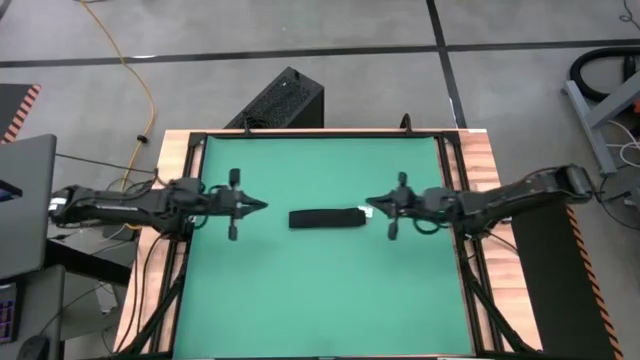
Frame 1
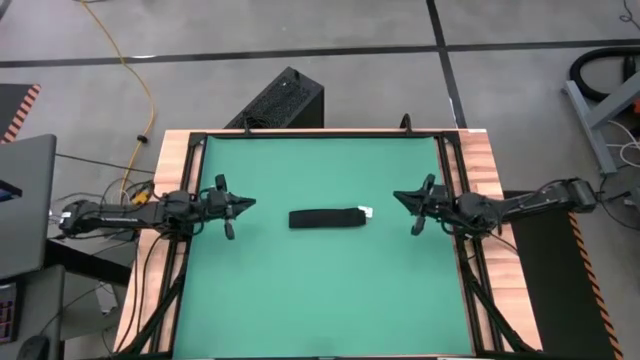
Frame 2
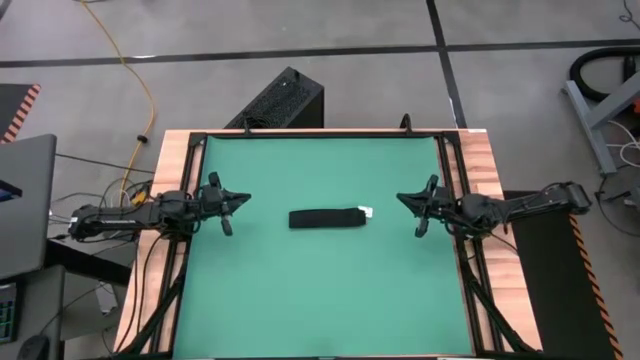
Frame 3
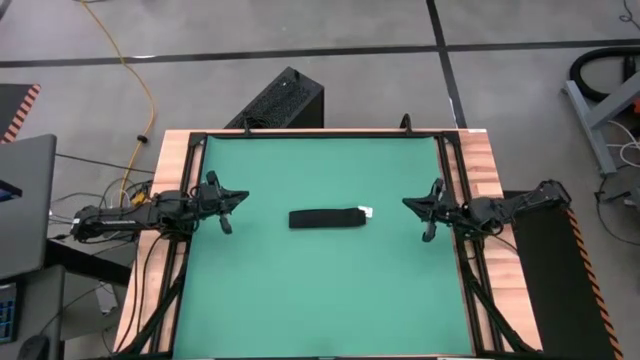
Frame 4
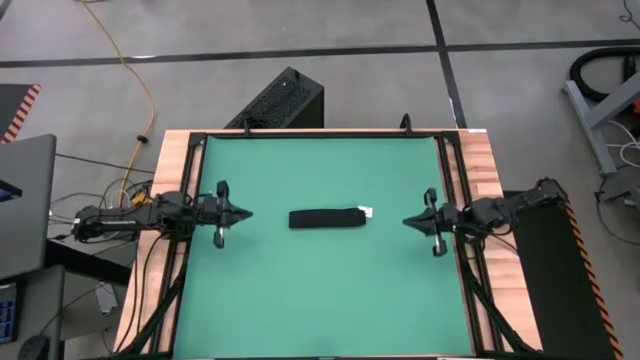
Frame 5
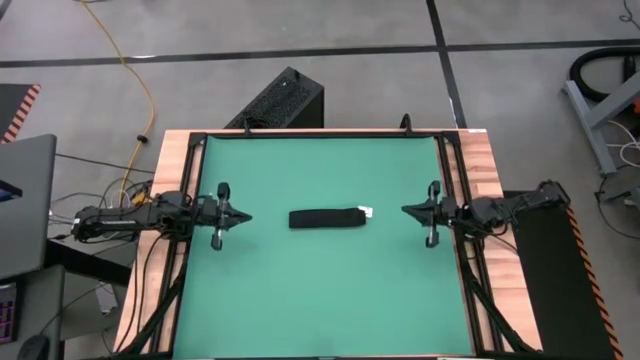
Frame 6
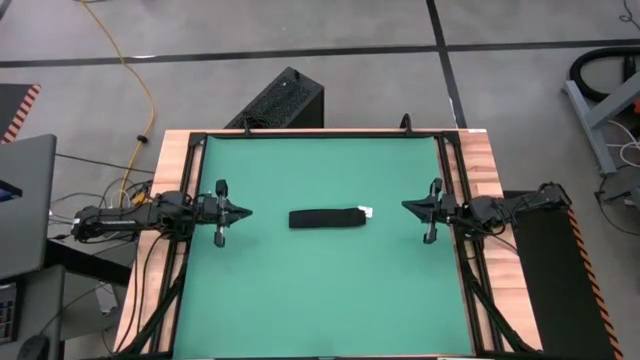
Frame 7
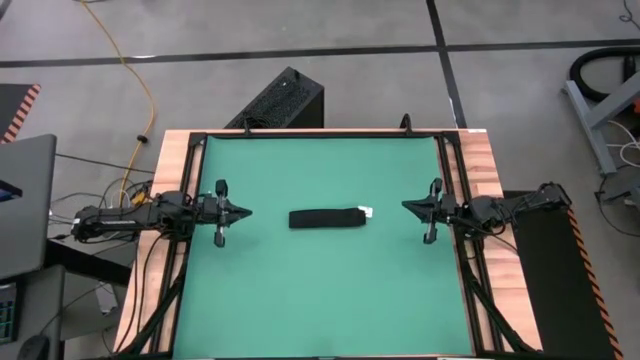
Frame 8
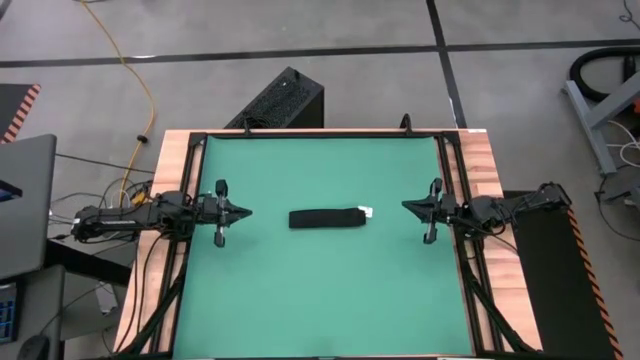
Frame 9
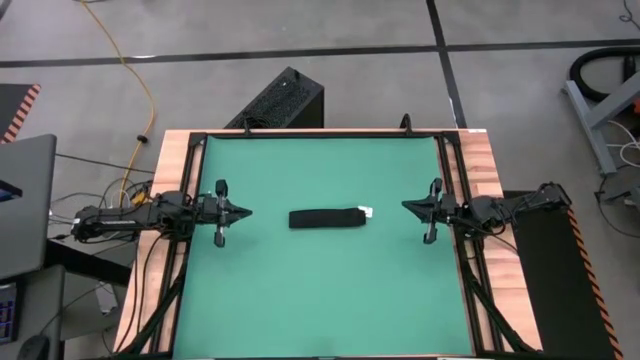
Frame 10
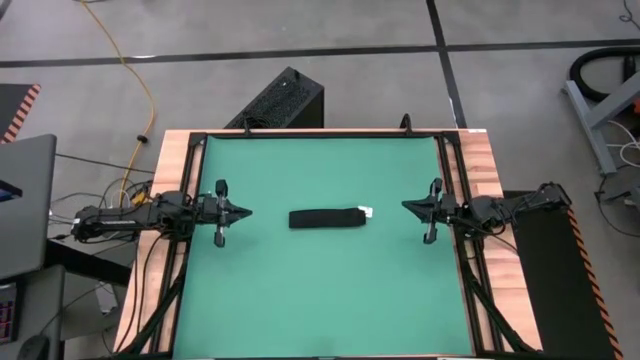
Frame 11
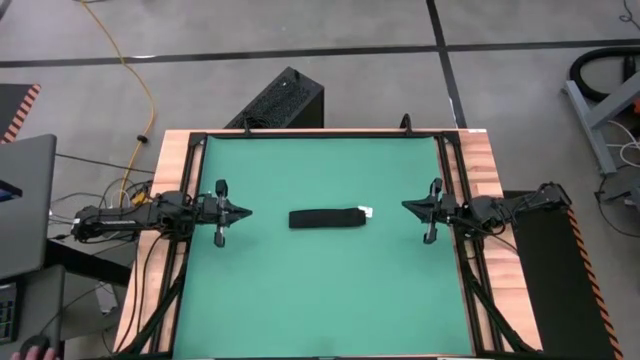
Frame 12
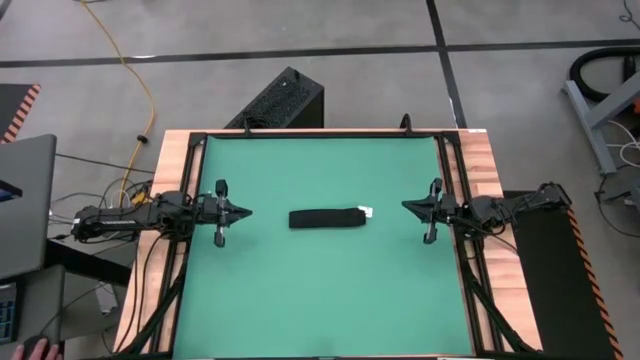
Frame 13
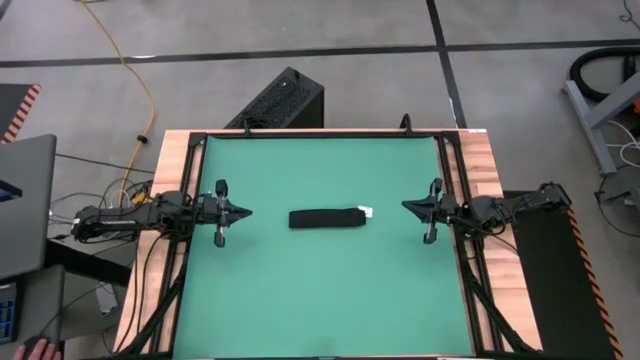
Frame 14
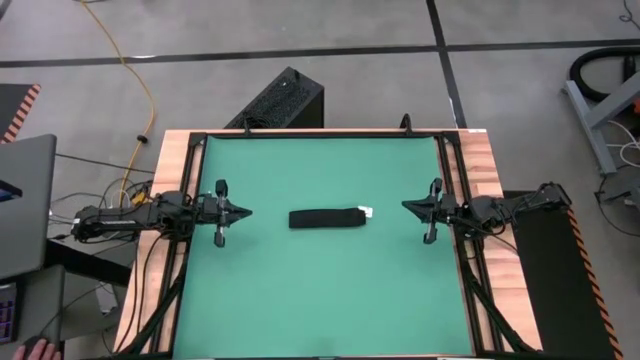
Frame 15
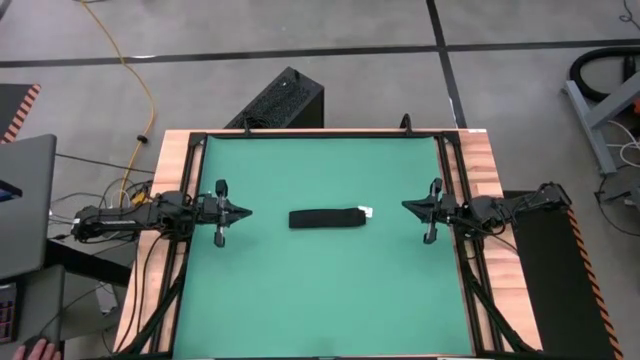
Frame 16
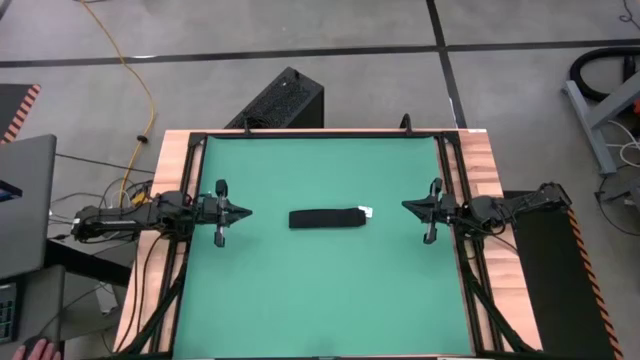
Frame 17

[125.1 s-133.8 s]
Task: Roll towel
Return to Home Position

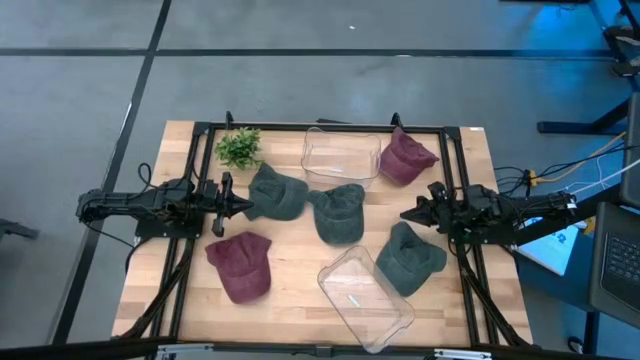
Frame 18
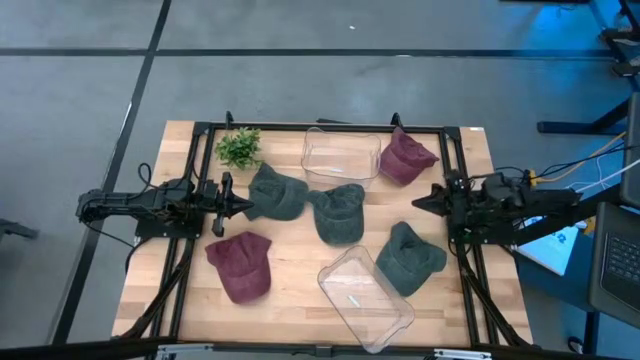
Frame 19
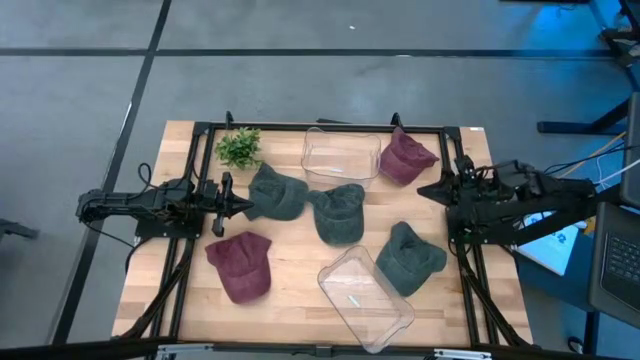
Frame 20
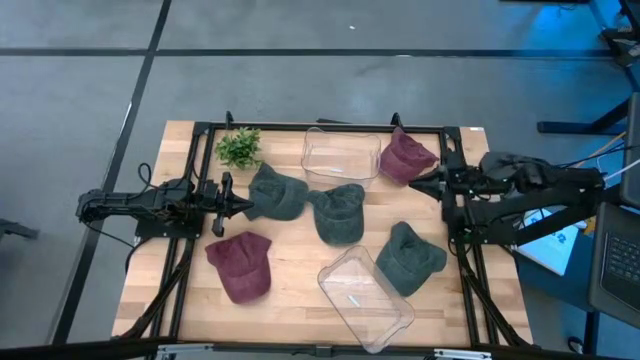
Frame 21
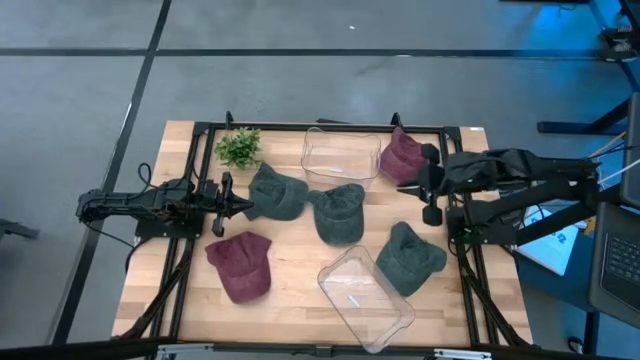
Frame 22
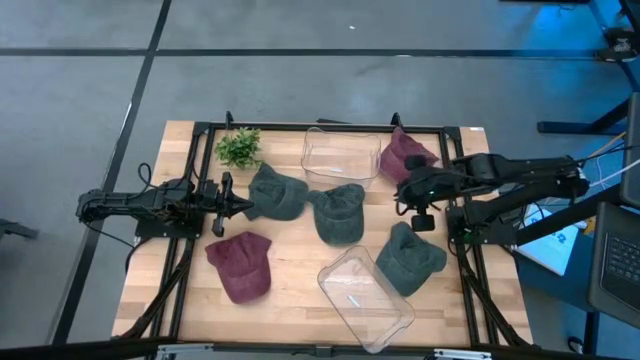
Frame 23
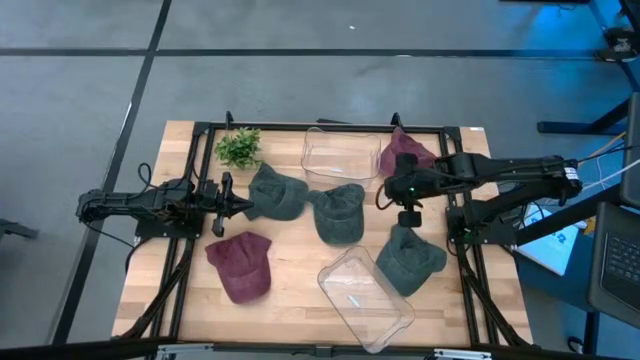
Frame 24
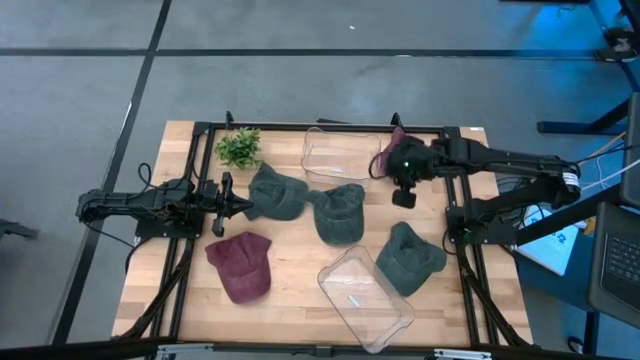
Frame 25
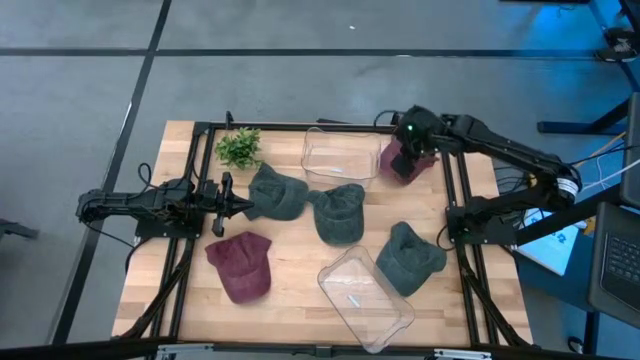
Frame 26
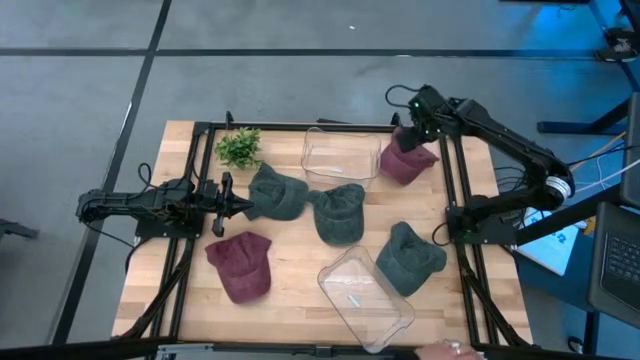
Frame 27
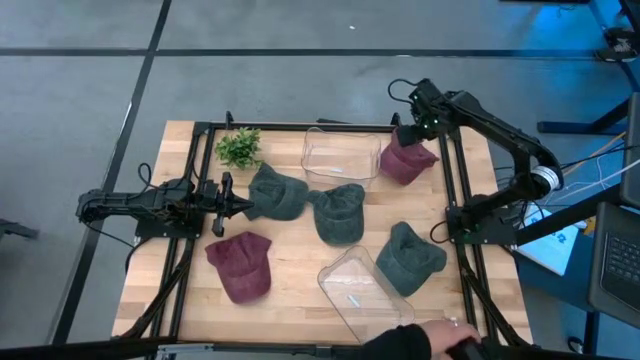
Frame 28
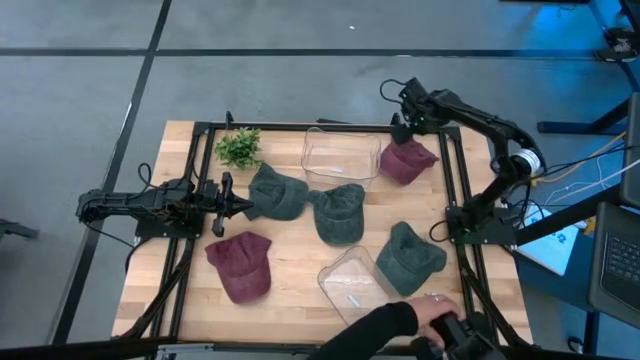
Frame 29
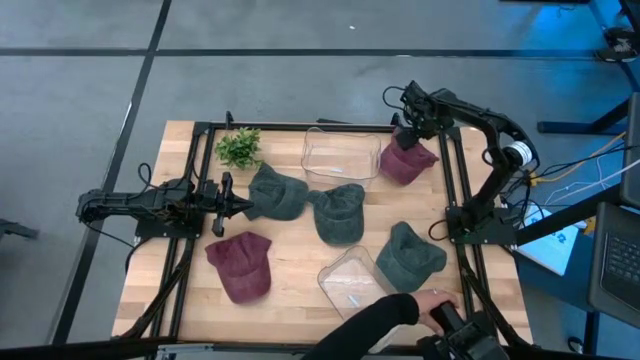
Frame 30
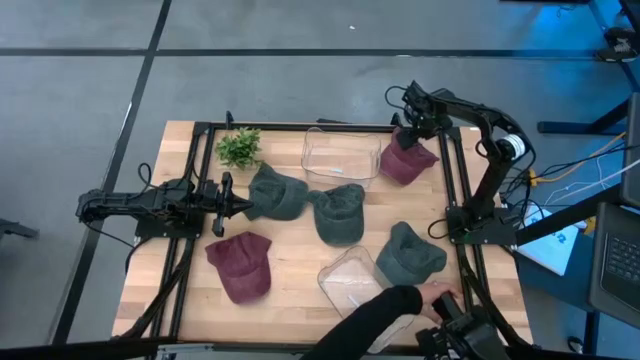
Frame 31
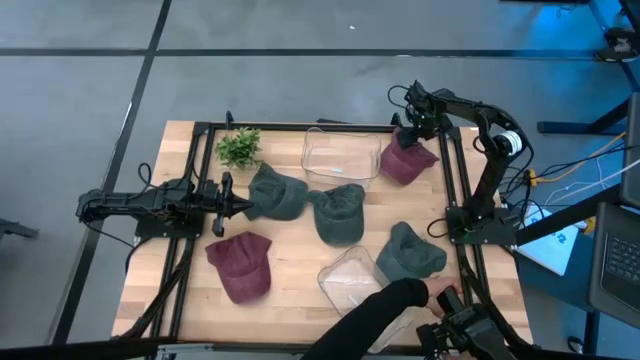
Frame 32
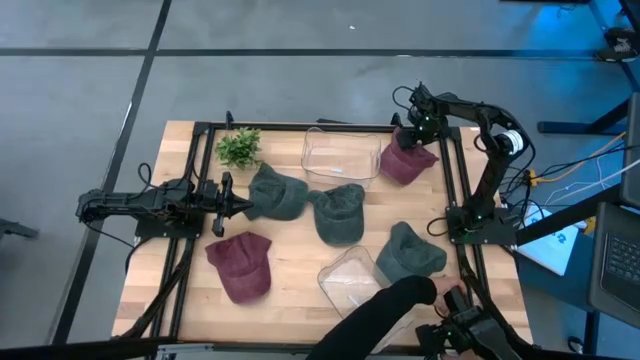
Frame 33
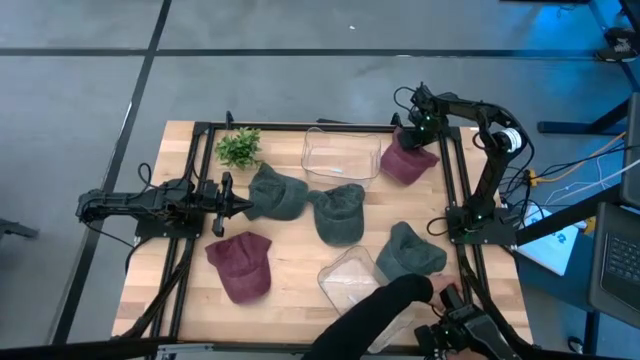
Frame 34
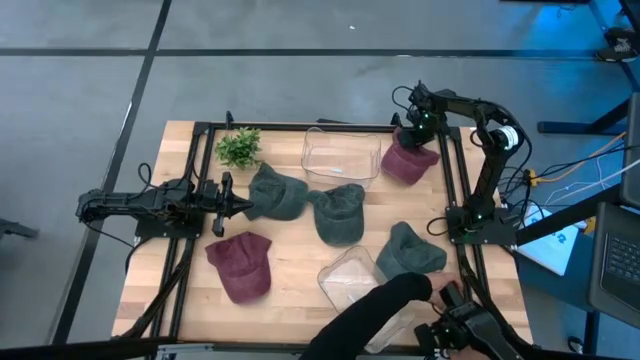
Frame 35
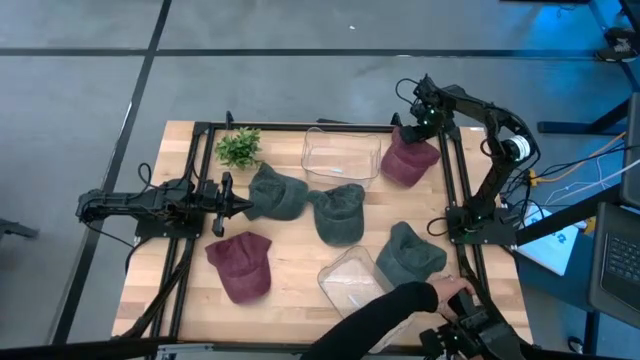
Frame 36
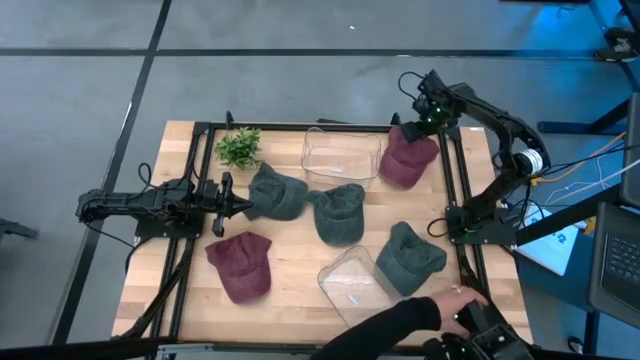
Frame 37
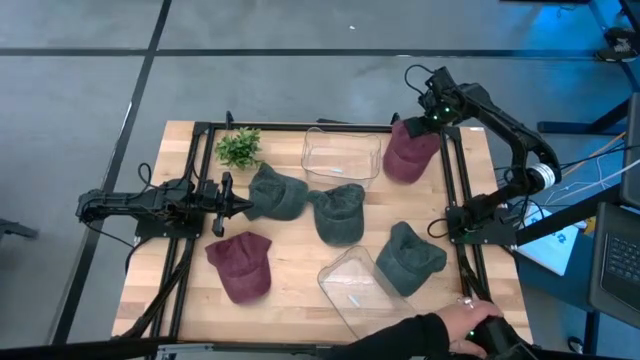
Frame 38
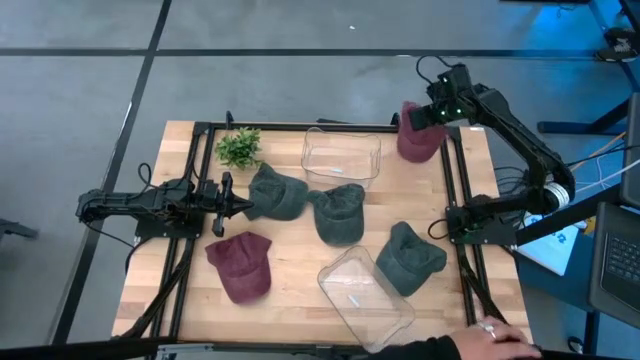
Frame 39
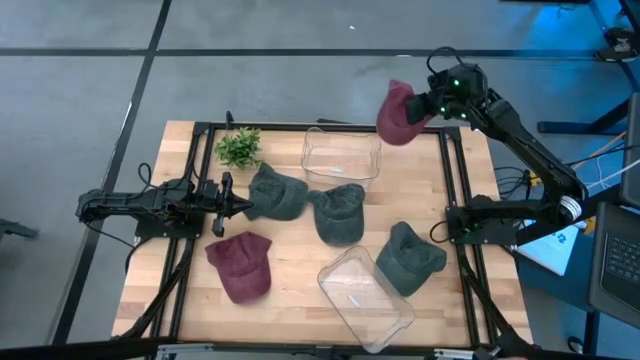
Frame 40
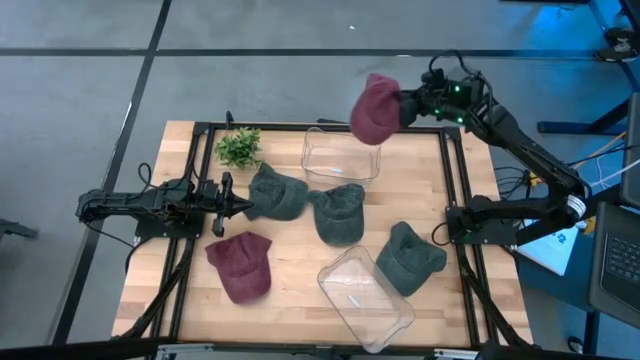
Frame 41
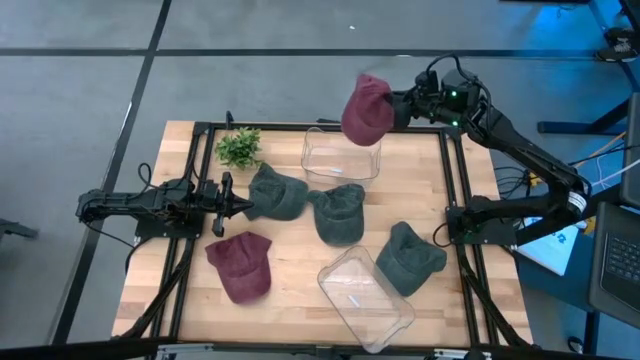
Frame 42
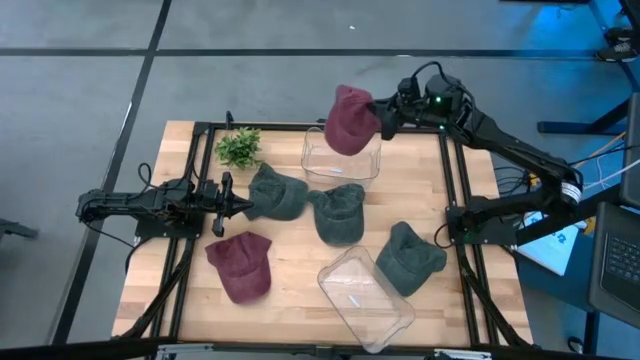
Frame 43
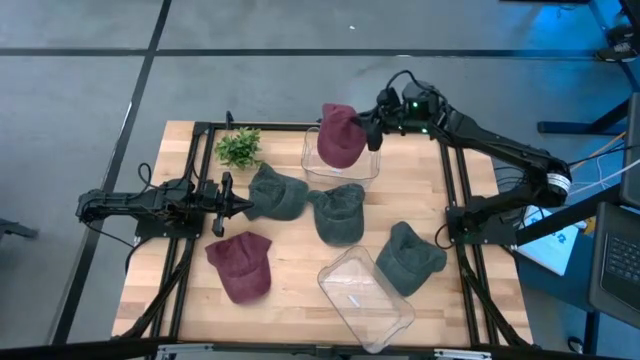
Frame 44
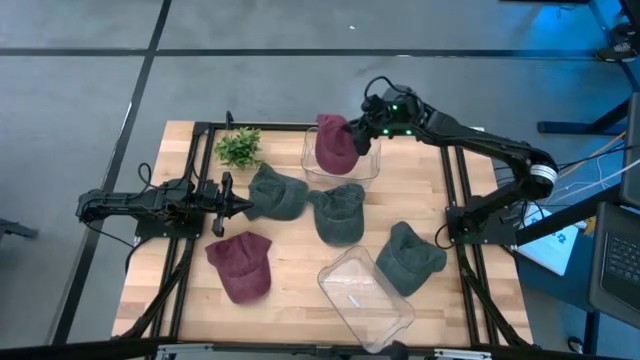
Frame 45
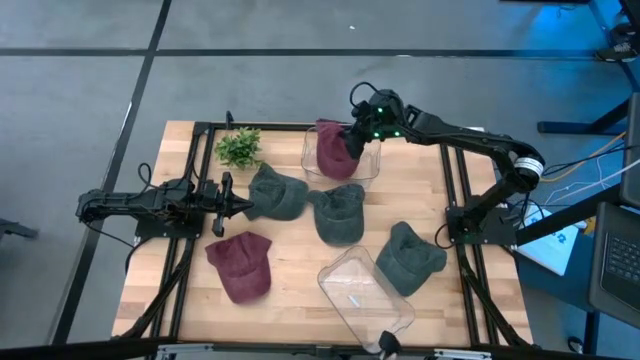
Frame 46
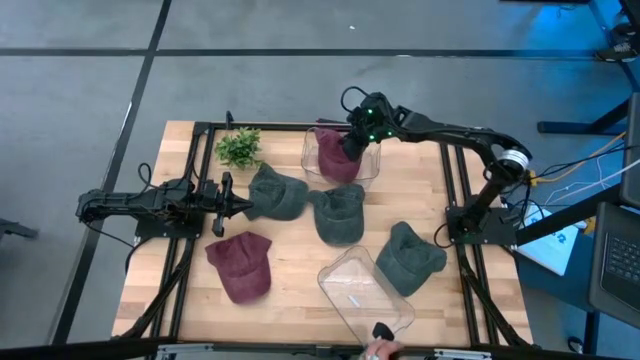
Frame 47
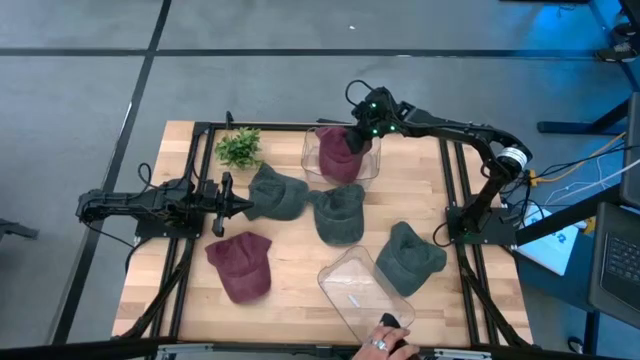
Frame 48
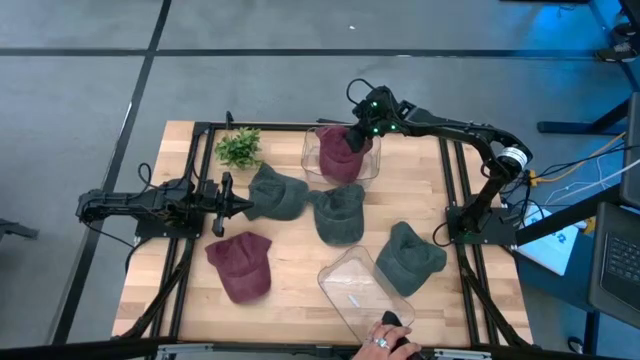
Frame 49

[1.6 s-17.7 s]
Task: Pick & Place hat
Put the top red cap into the top transparent bin
